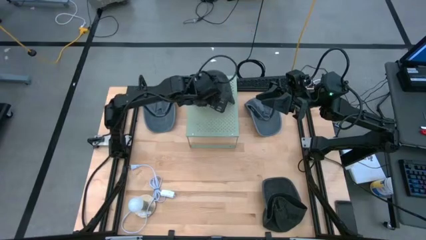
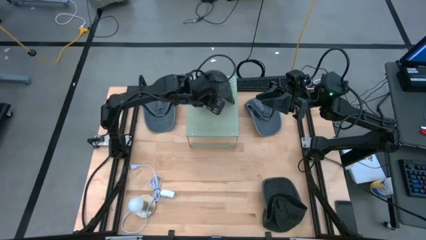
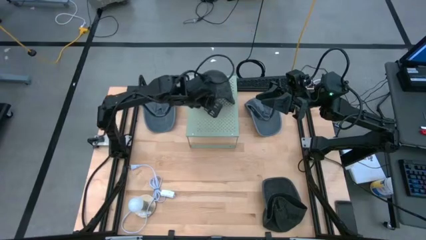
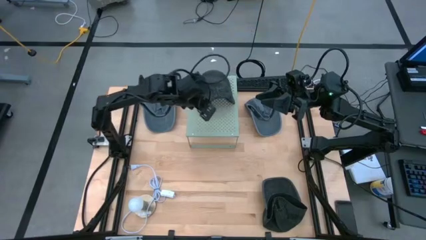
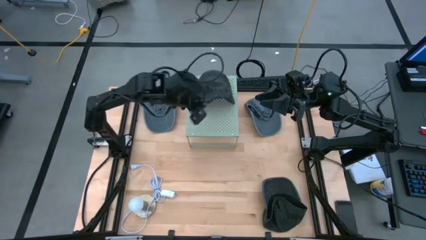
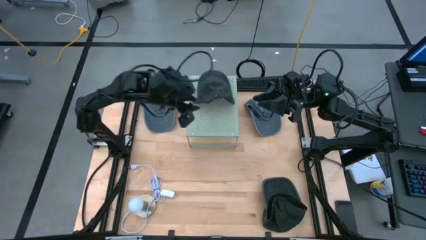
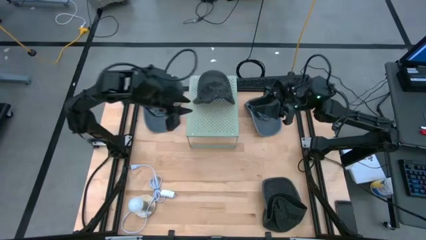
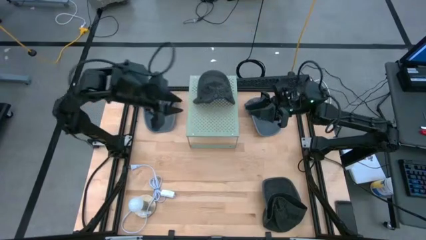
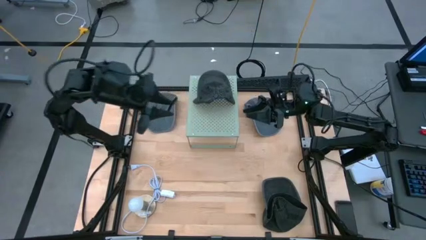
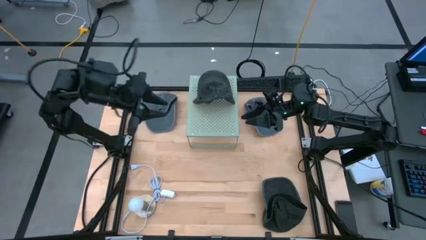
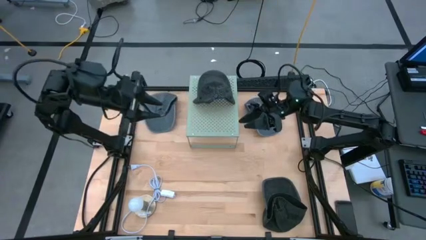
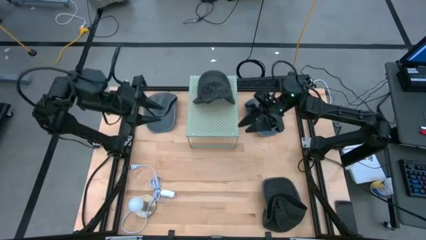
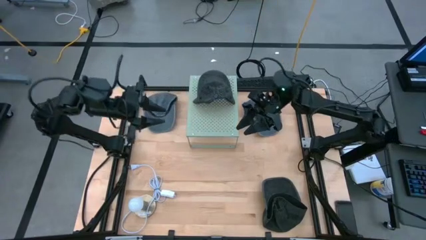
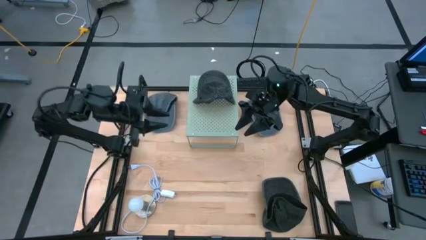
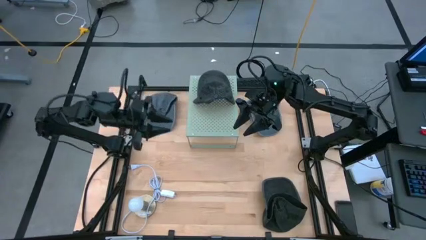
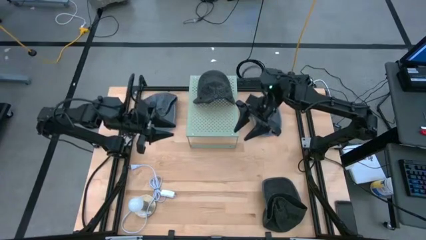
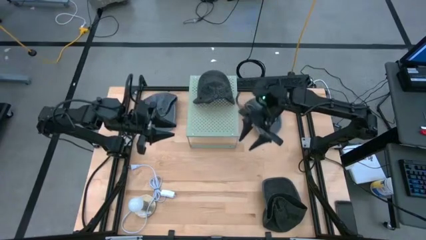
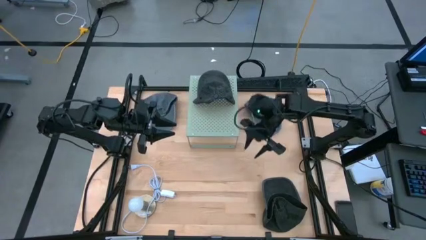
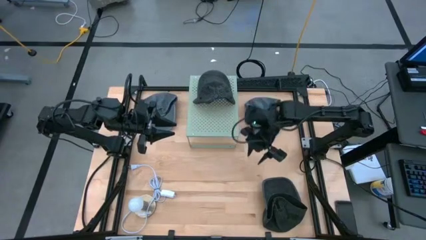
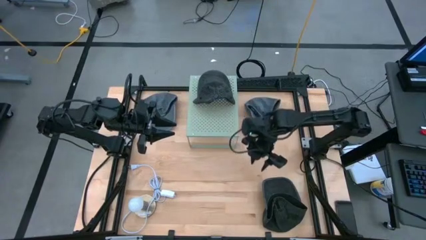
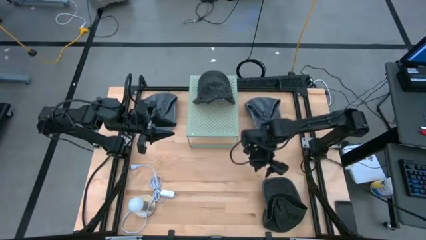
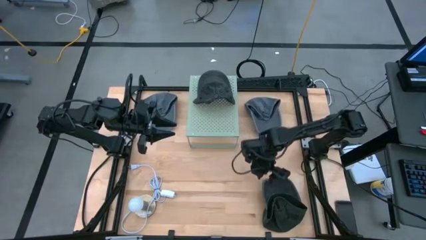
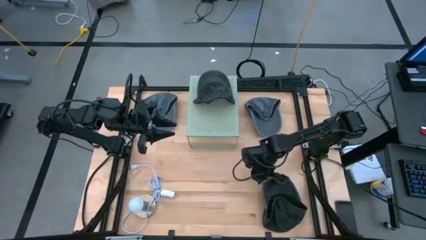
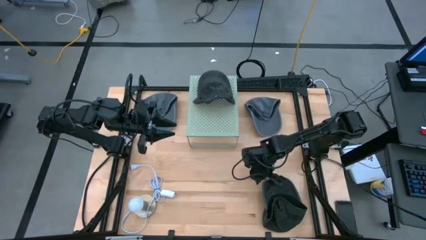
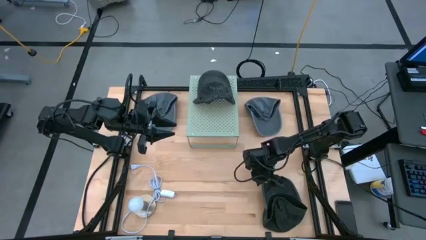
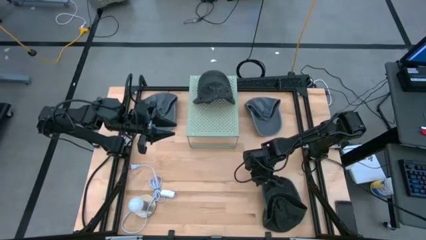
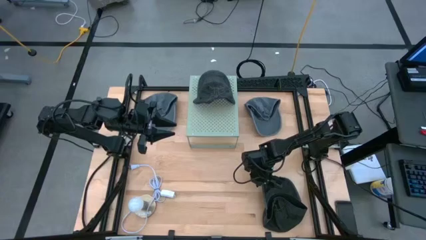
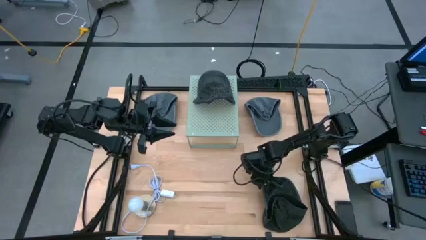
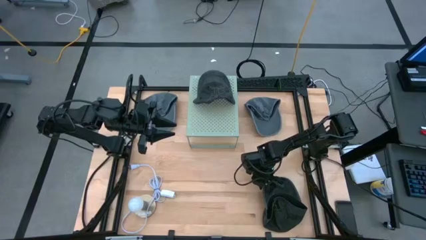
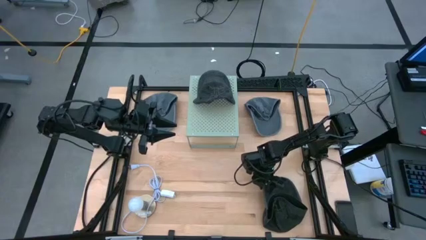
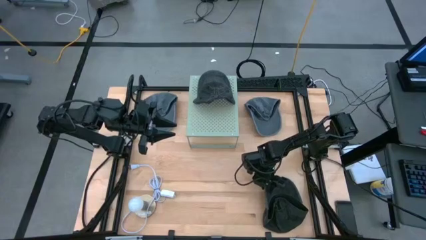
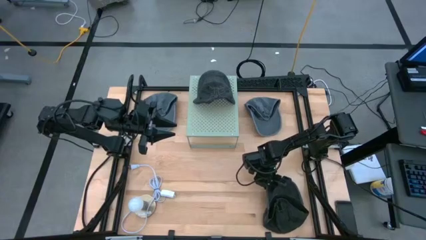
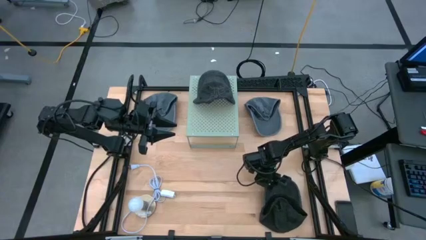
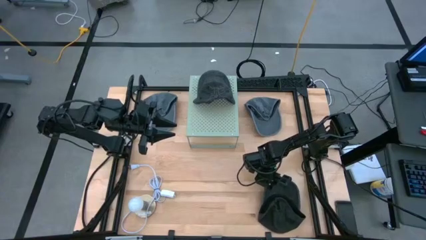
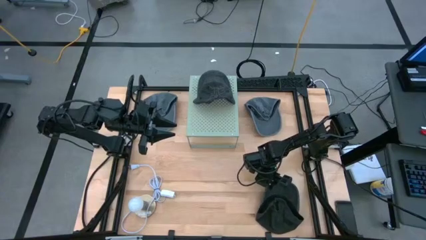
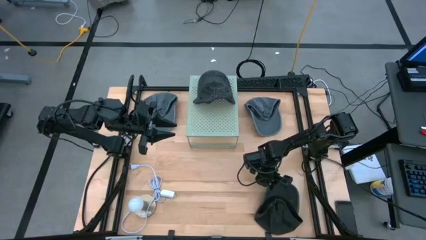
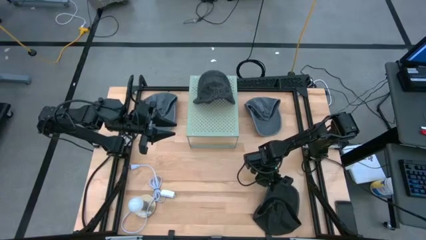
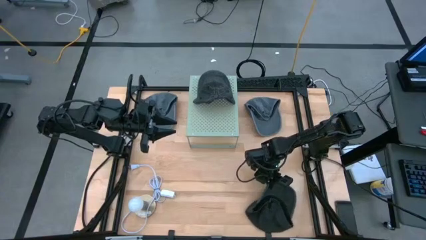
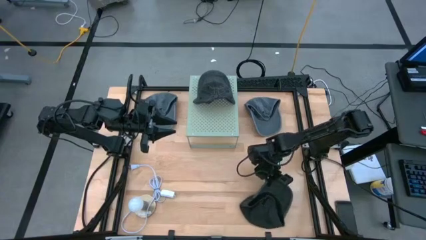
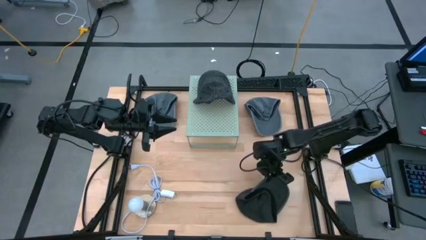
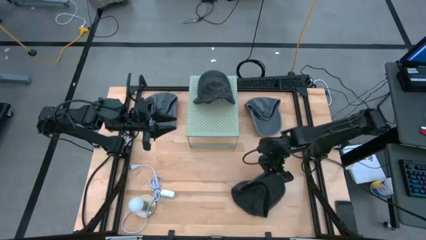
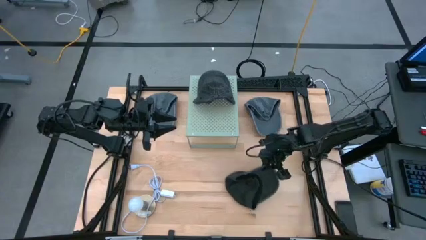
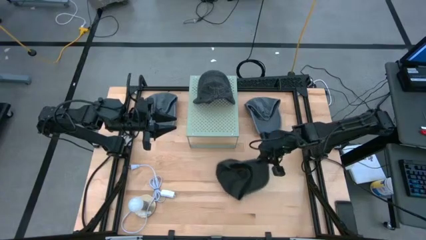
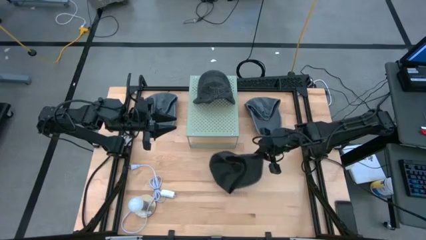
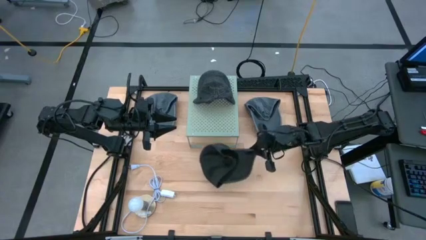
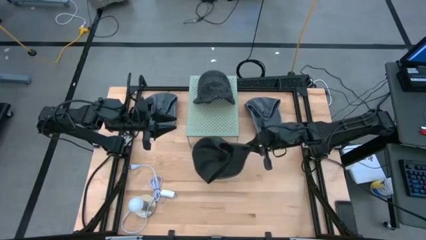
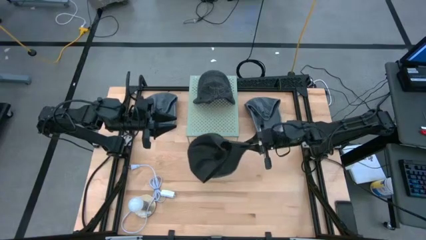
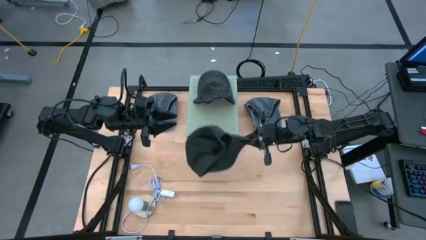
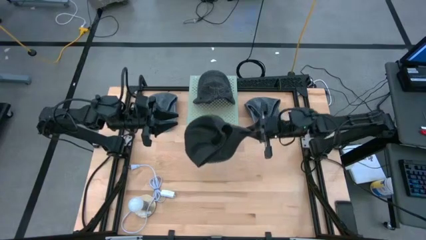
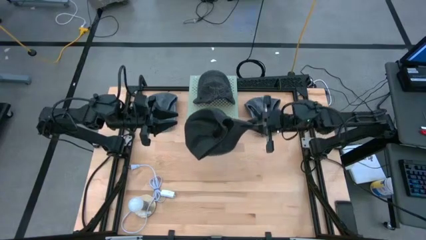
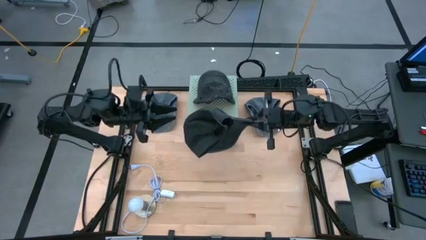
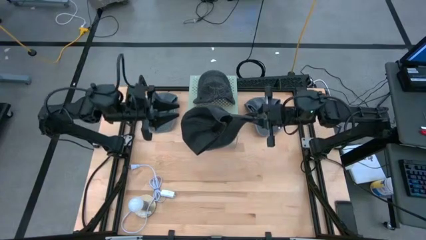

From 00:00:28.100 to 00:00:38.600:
Task: Pick & Place hat
Stack the black cap on top of the black cap on the shelf
